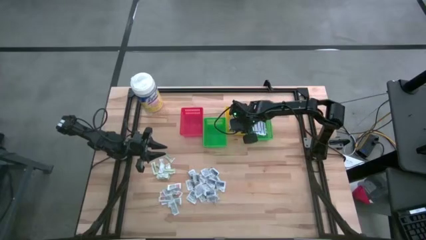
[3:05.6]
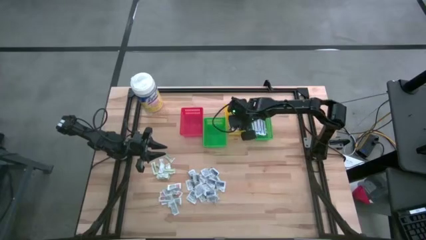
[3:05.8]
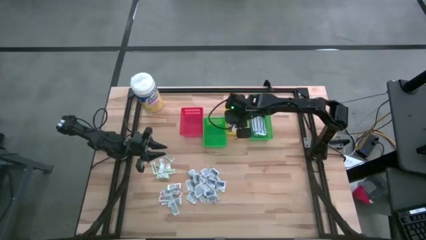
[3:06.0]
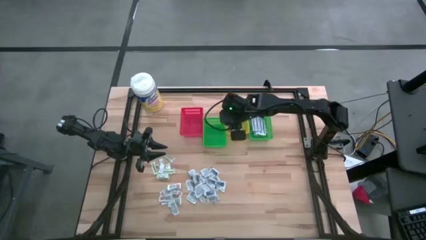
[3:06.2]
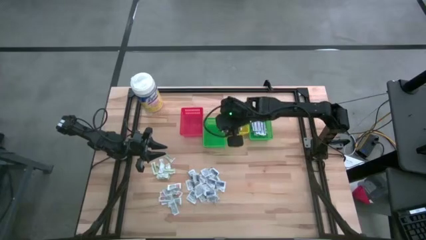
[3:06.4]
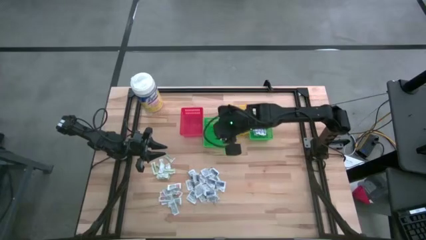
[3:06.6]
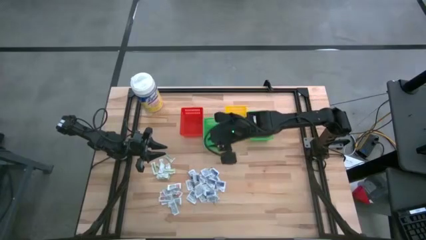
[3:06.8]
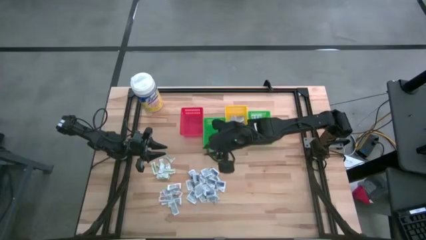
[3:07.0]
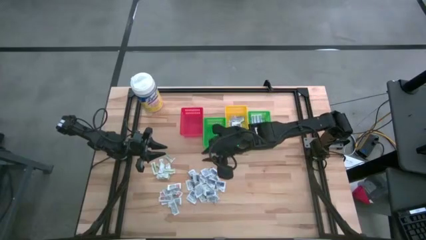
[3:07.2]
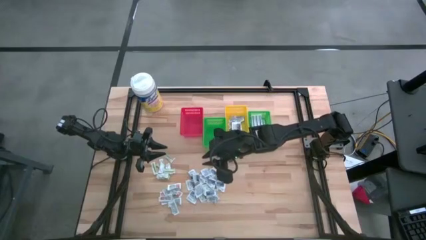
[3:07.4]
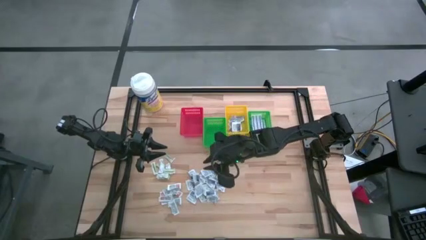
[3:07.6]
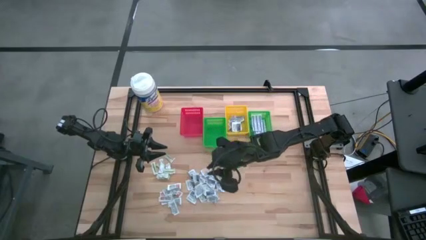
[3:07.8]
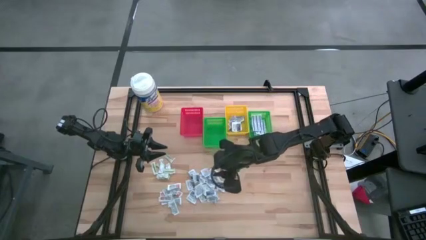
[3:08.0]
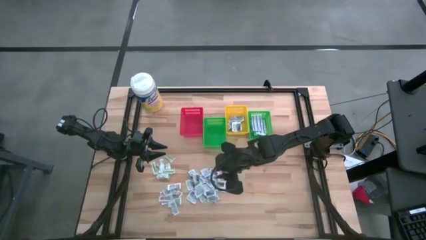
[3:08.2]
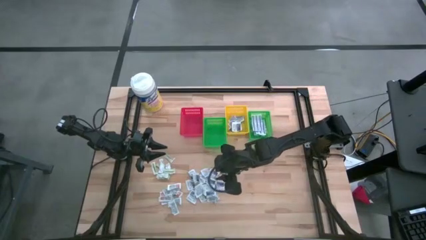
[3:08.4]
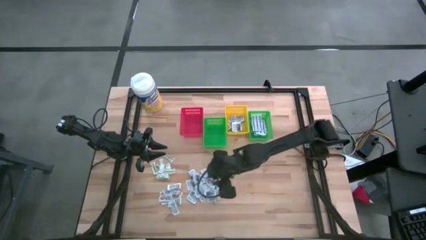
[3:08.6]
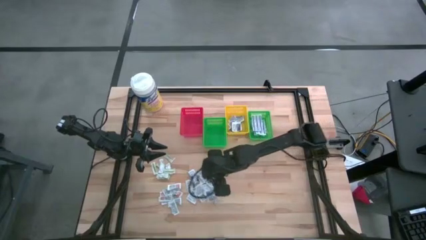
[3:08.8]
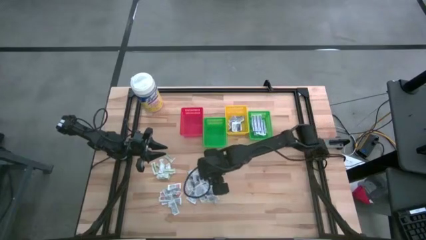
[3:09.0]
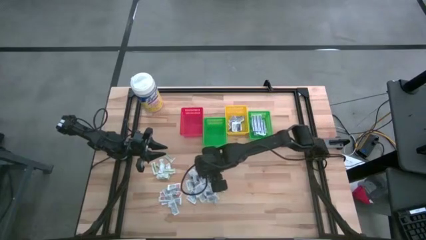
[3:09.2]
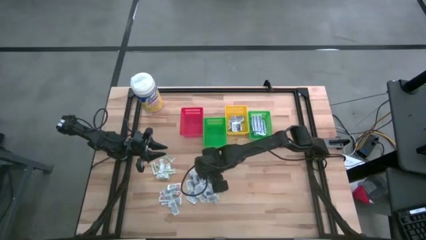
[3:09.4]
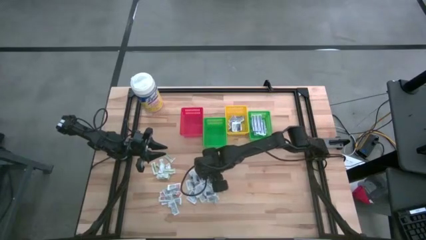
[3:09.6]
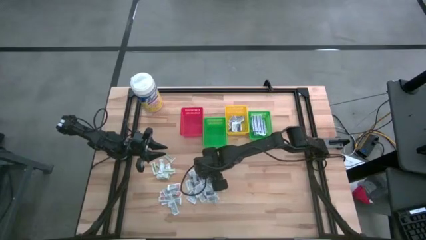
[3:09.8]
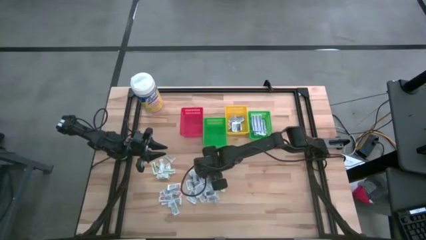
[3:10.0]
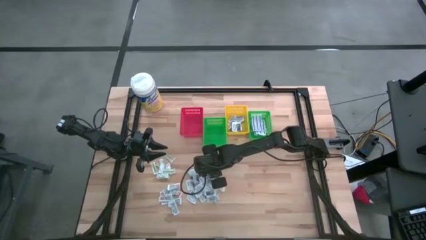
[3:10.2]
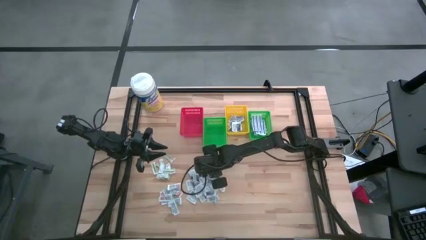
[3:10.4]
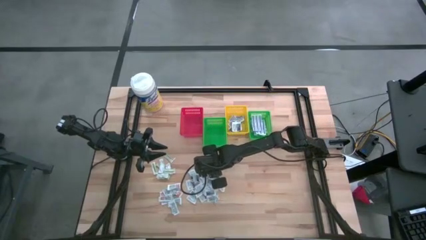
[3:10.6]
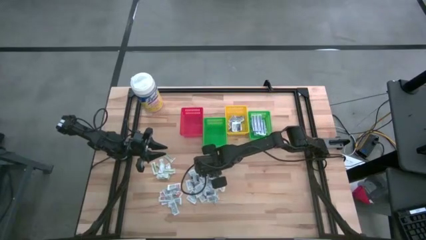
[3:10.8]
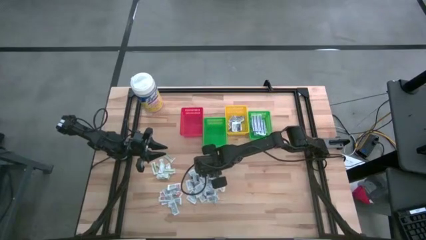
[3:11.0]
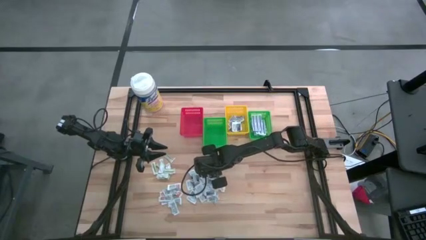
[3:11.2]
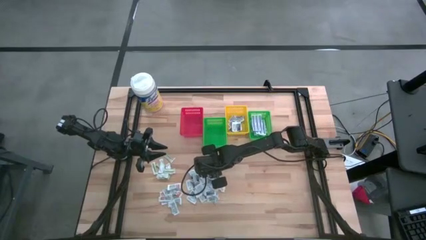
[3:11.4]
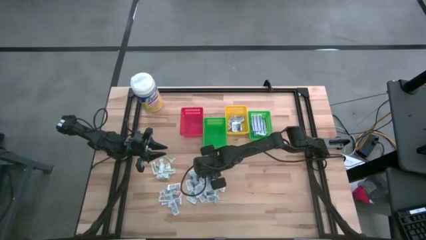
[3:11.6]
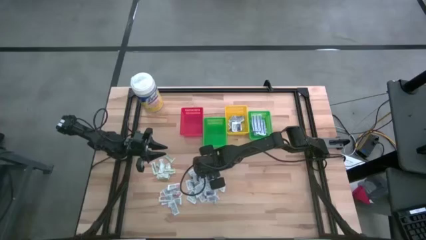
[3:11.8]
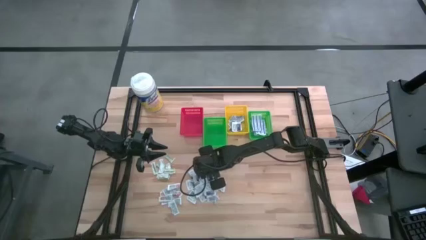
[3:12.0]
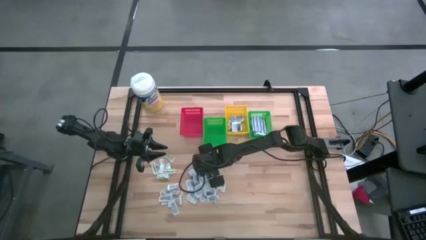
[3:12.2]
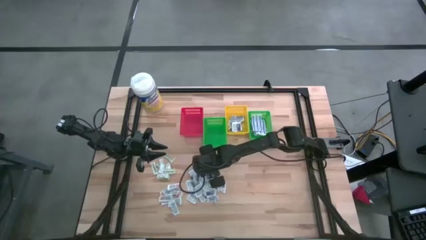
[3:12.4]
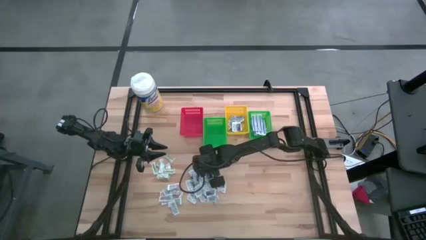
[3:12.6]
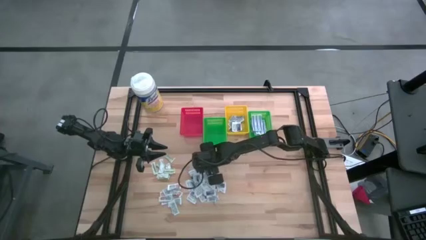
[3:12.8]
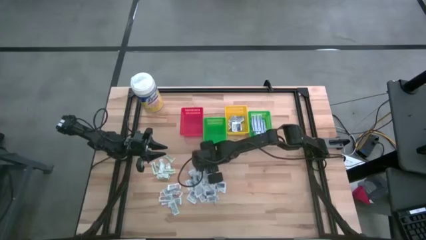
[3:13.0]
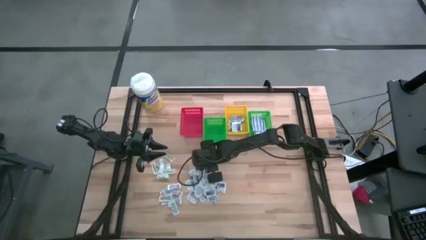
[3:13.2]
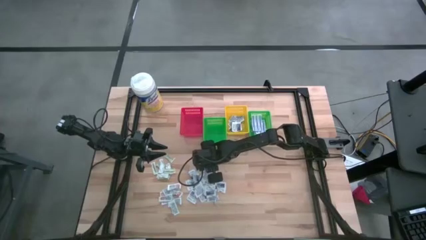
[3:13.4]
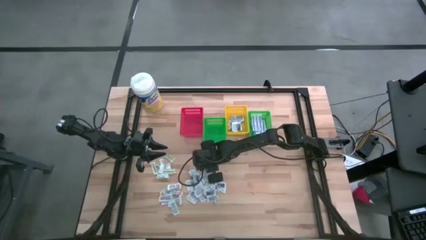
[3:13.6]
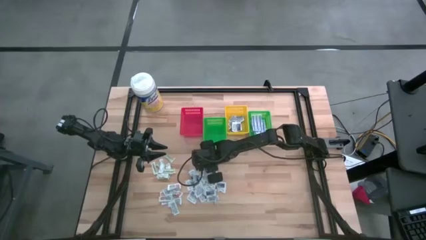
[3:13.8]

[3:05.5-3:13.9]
Task: Pick & Place First Aid Supplies
Put the alcohol pad into the yellow basket

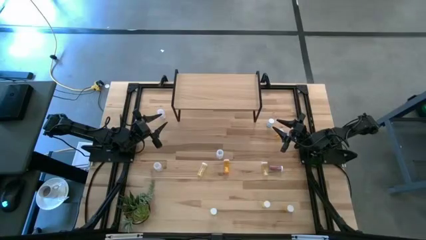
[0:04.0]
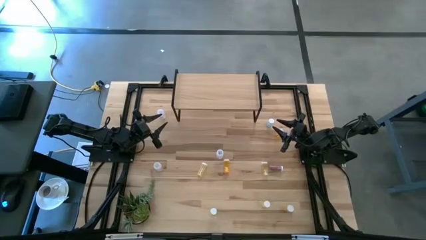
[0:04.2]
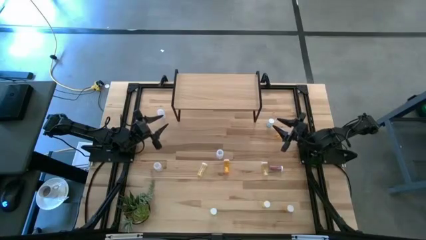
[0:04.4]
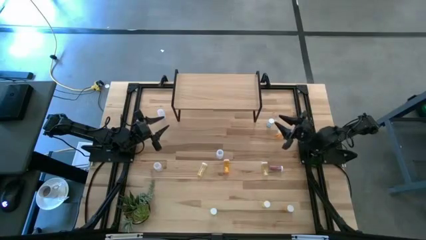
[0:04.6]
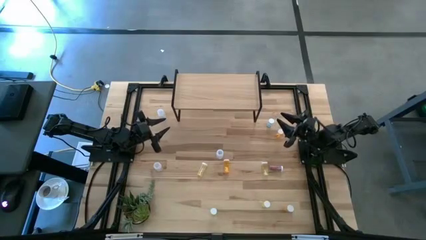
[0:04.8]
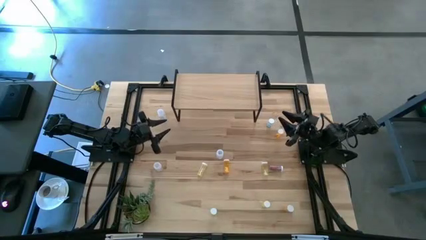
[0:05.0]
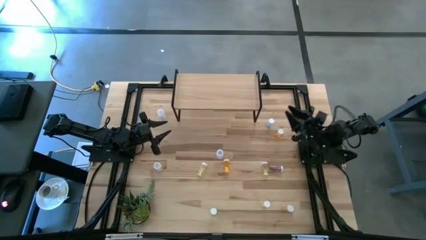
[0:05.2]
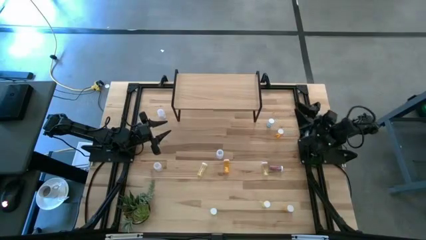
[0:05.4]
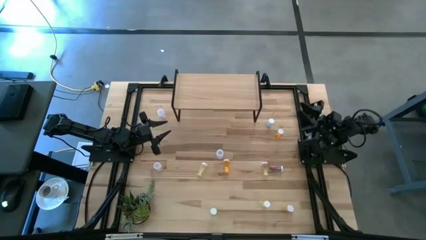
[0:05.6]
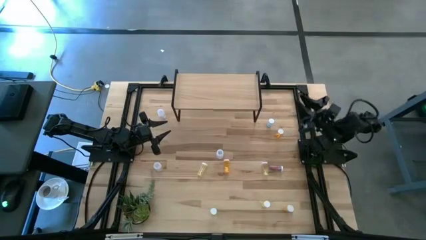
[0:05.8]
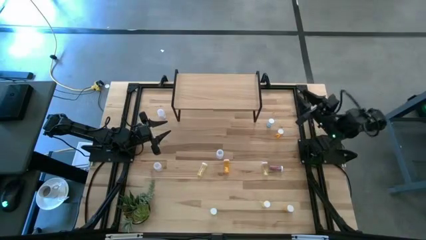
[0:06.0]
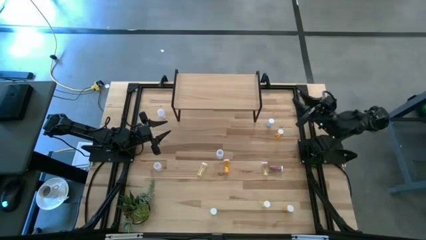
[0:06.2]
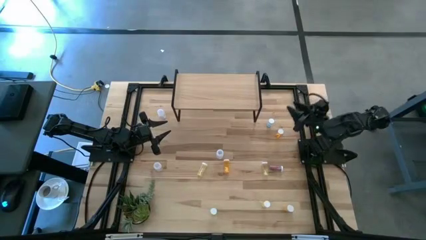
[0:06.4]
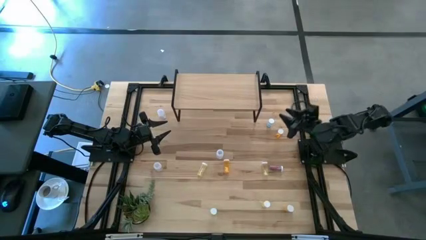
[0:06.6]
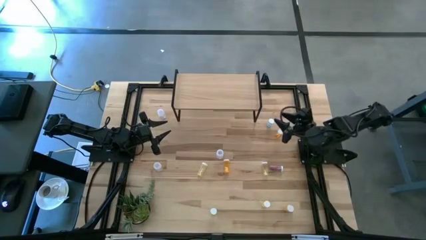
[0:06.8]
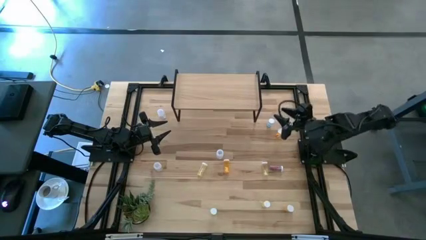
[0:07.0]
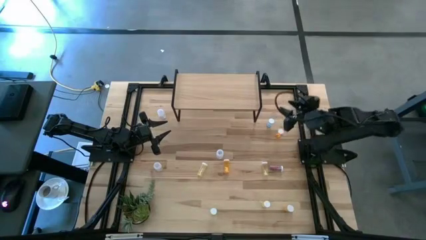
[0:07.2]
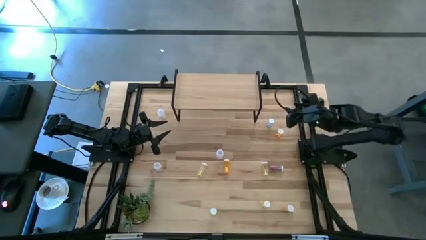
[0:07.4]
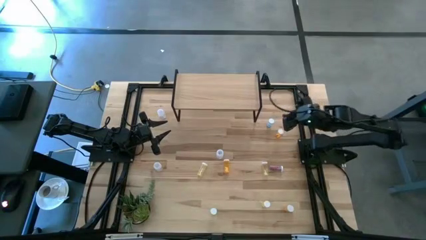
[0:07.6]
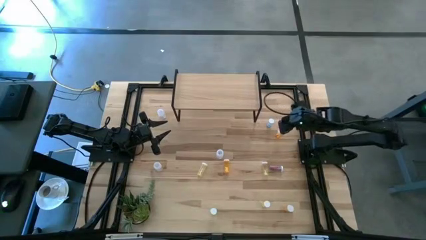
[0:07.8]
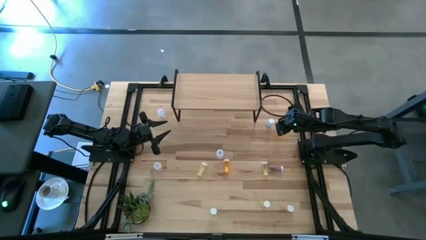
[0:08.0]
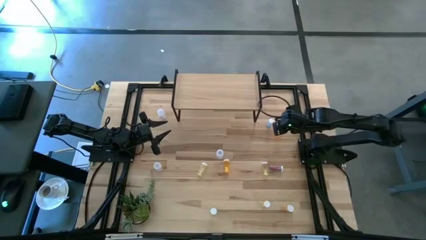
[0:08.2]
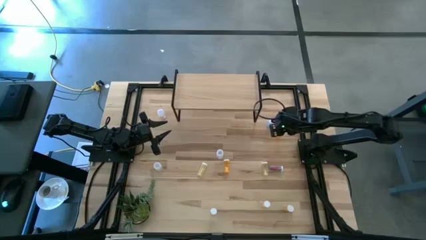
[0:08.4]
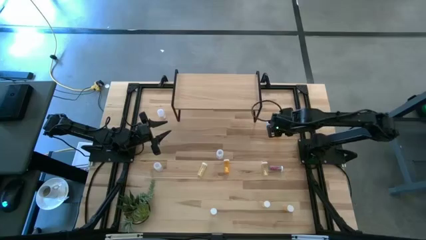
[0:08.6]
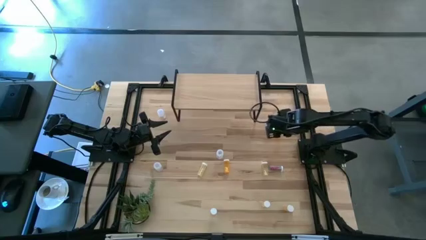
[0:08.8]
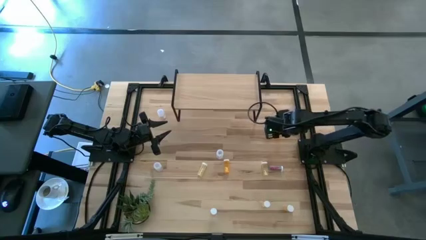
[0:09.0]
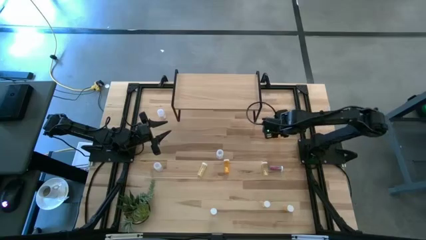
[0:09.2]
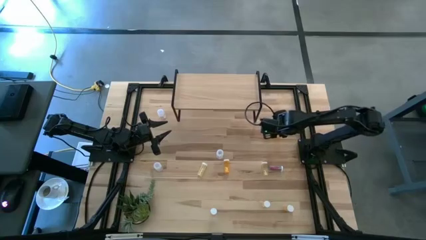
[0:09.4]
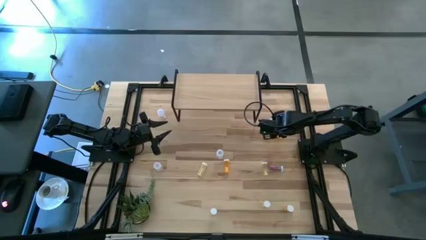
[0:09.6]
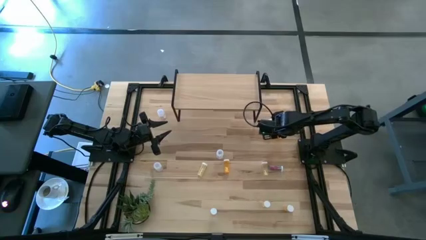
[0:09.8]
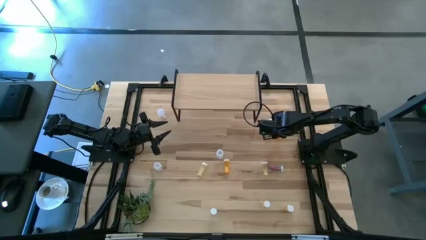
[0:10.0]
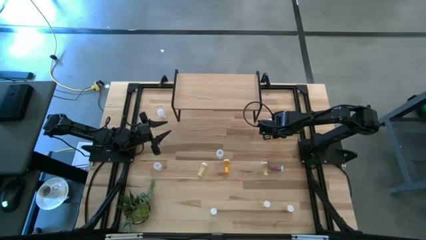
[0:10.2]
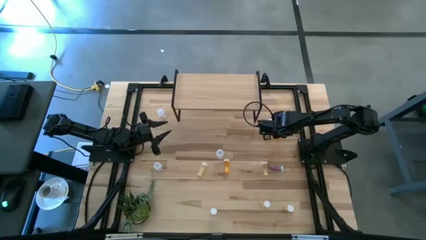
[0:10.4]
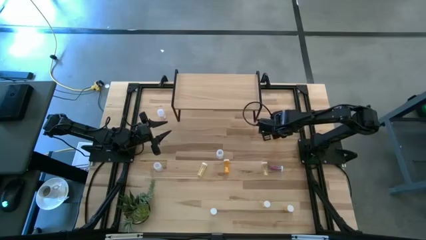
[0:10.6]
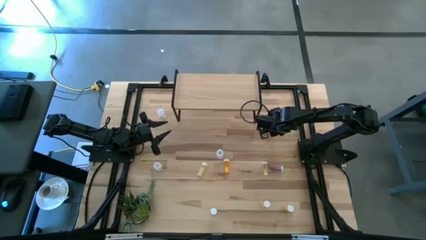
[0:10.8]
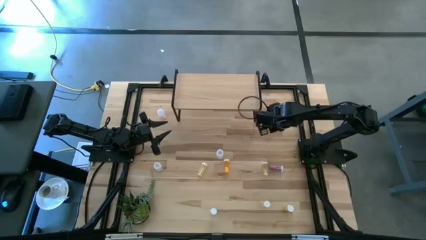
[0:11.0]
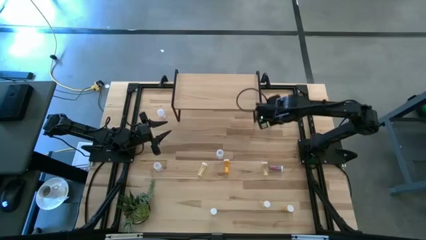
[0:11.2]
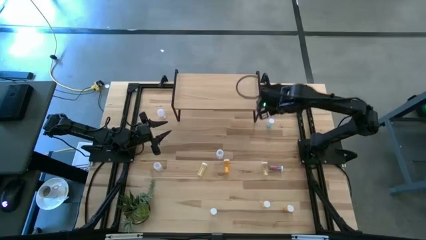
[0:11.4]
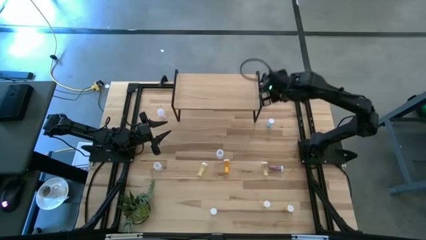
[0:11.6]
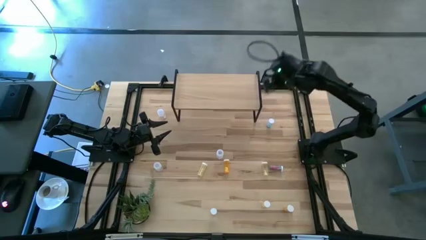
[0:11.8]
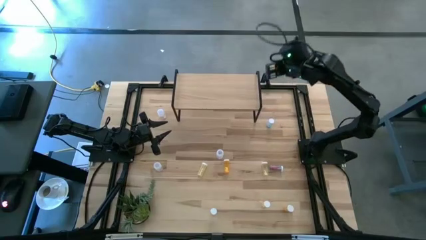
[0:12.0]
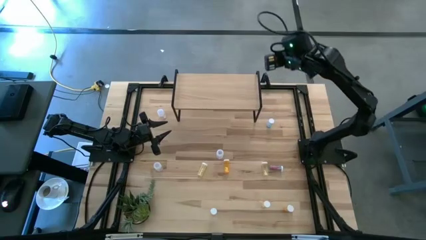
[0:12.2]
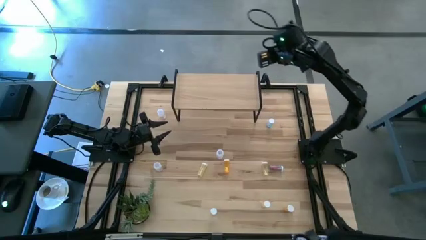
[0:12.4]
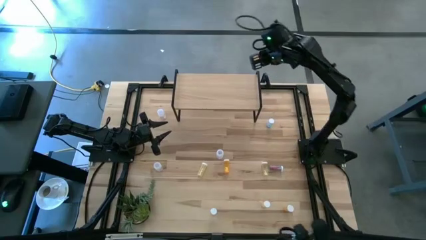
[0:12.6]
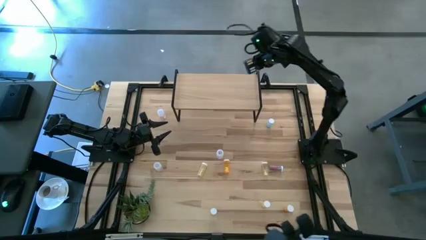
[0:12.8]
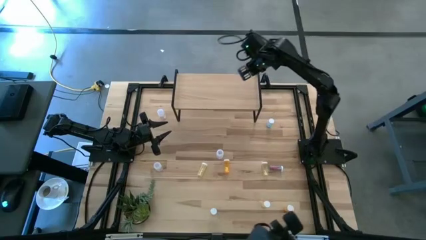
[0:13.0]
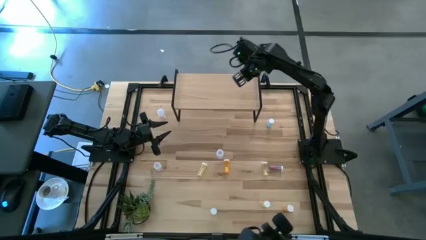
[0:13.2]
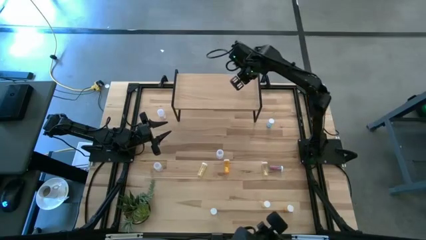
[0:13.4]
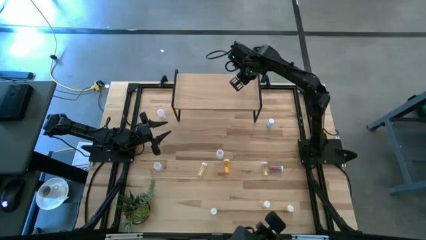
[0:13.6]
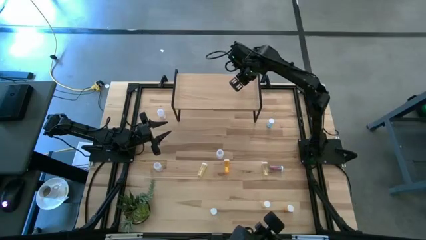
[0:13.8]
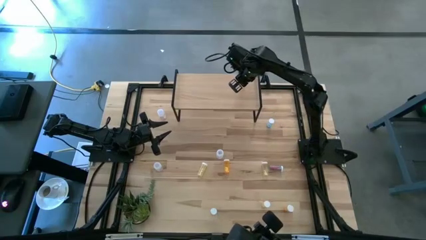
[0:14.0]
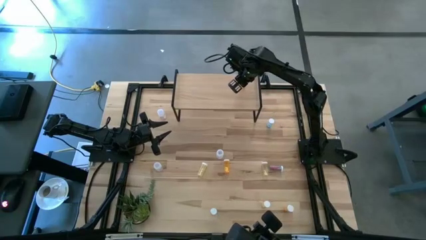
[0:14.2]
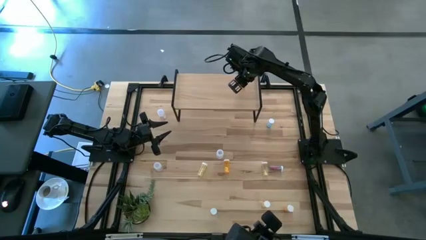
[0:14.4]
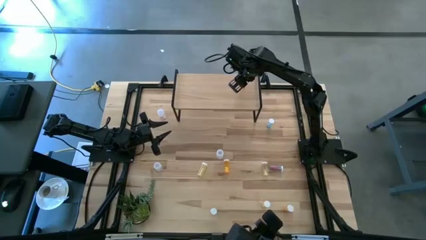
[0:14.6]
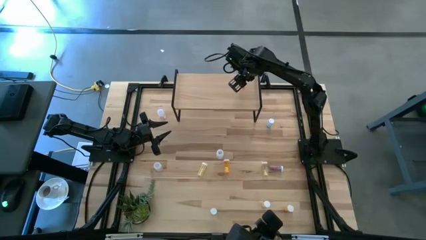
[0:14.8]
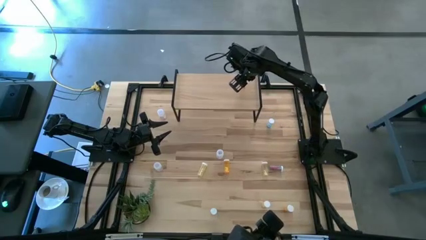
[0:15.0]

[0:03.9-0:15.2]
Task: Pick and place medicine bottles onto shelf by color
Put the top right orange pill bottle on the shelf
